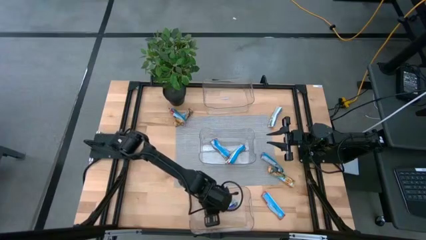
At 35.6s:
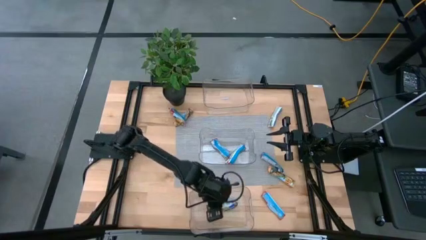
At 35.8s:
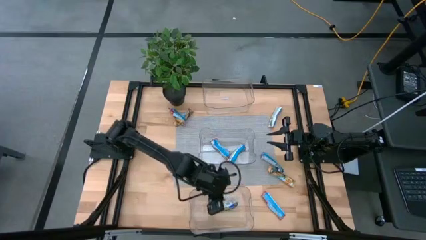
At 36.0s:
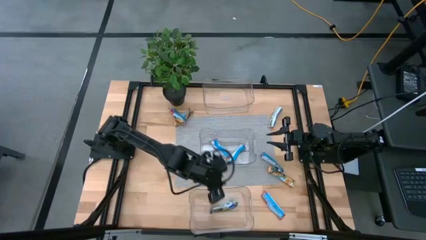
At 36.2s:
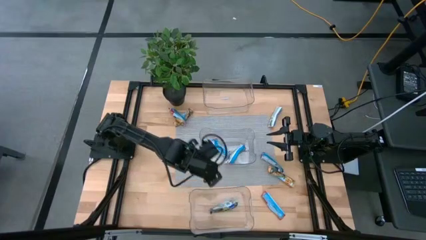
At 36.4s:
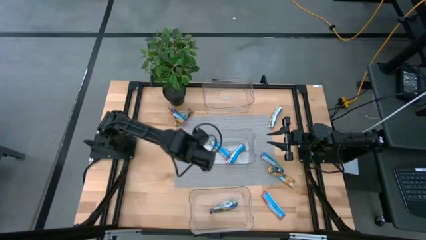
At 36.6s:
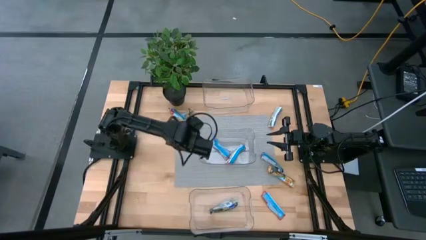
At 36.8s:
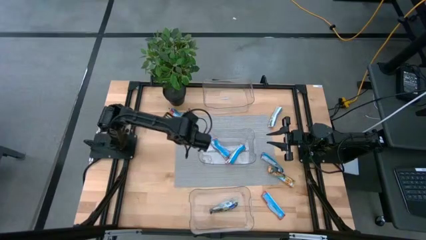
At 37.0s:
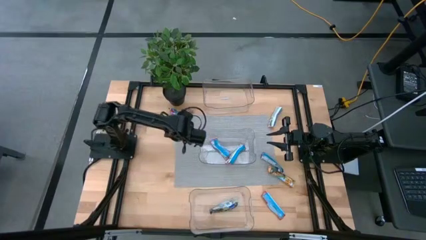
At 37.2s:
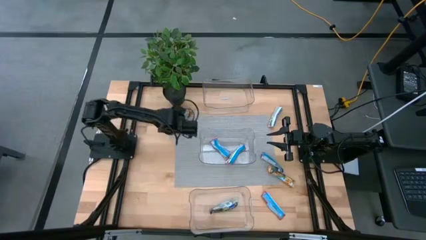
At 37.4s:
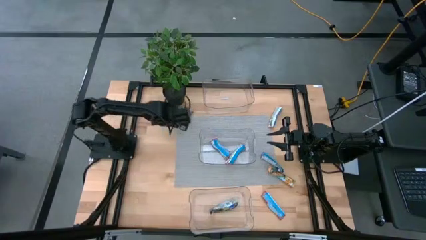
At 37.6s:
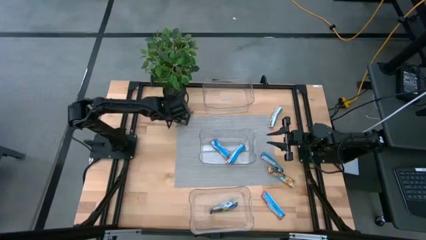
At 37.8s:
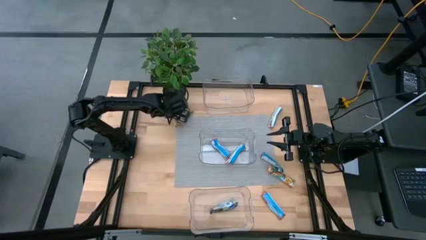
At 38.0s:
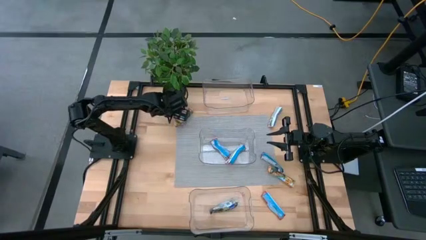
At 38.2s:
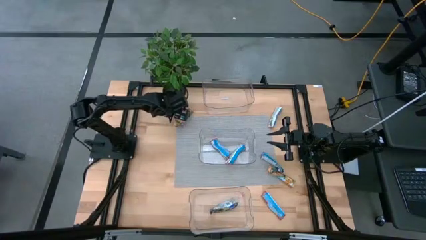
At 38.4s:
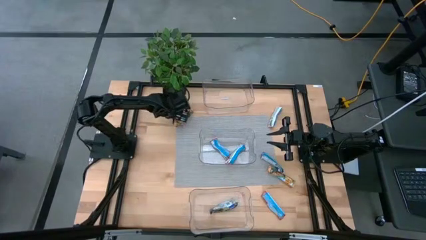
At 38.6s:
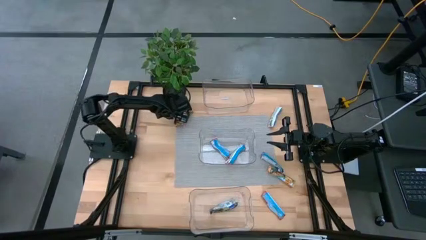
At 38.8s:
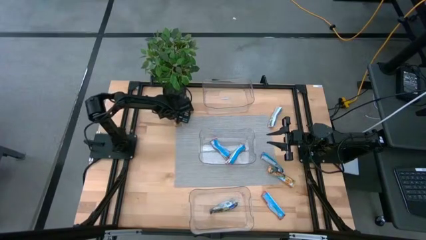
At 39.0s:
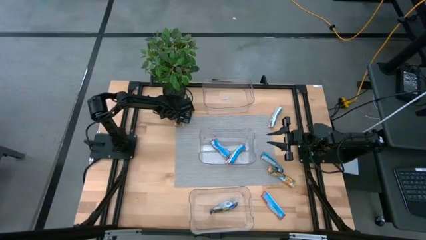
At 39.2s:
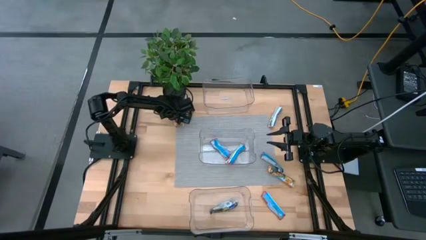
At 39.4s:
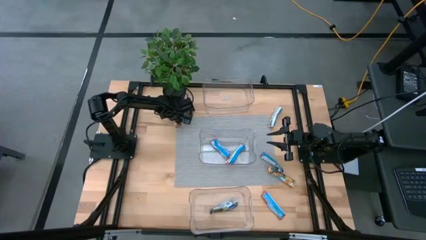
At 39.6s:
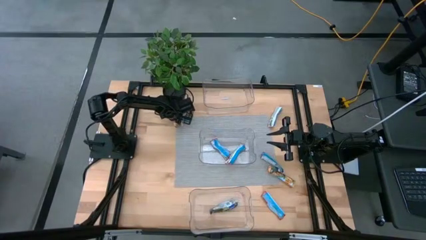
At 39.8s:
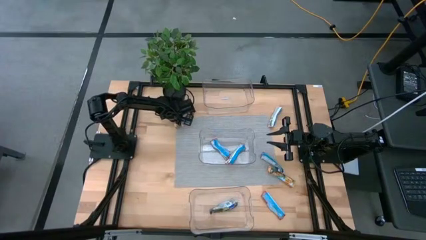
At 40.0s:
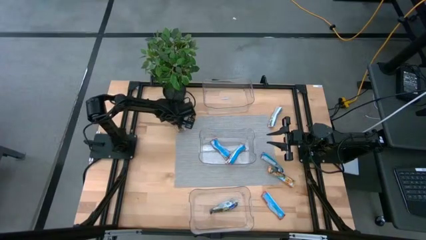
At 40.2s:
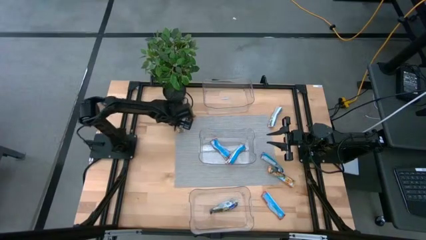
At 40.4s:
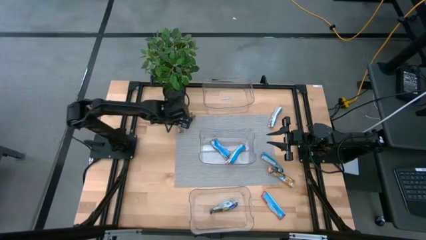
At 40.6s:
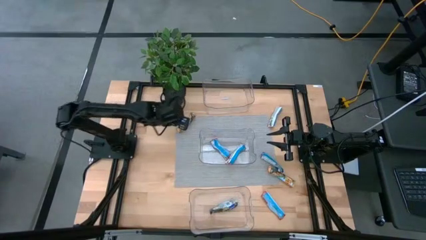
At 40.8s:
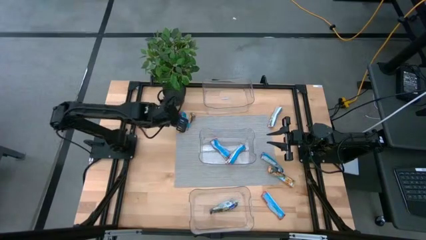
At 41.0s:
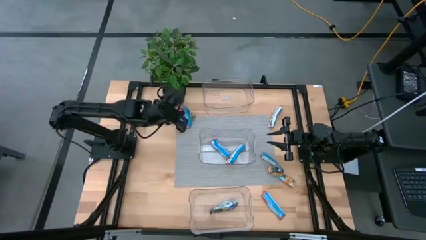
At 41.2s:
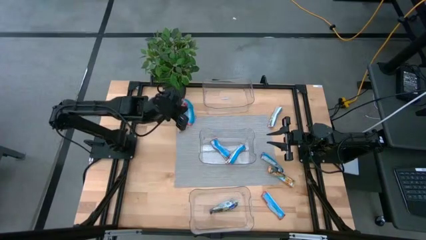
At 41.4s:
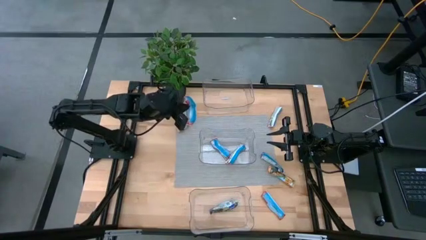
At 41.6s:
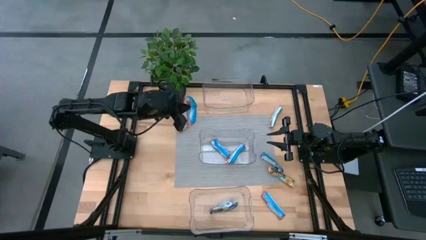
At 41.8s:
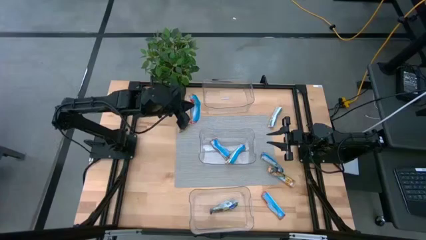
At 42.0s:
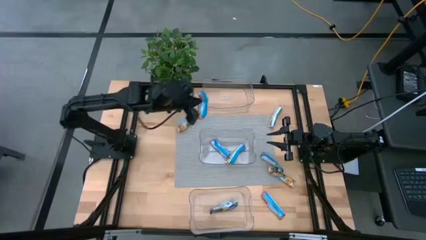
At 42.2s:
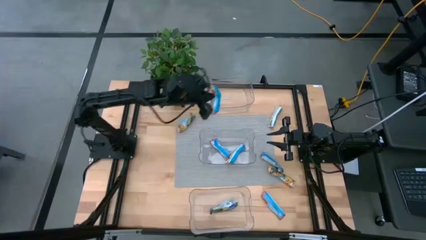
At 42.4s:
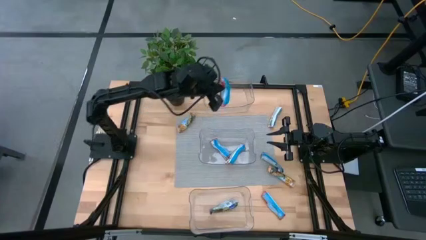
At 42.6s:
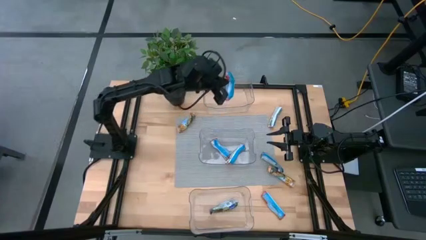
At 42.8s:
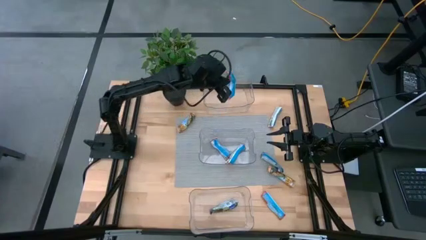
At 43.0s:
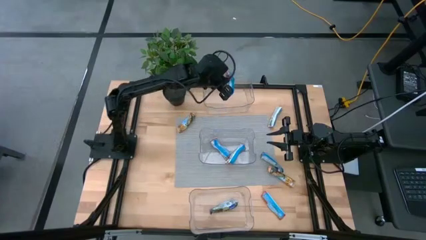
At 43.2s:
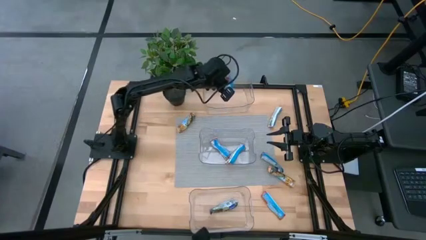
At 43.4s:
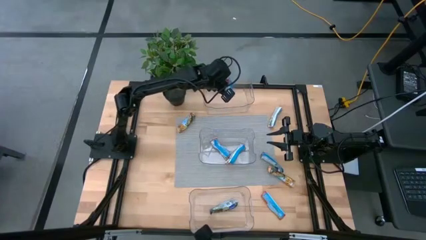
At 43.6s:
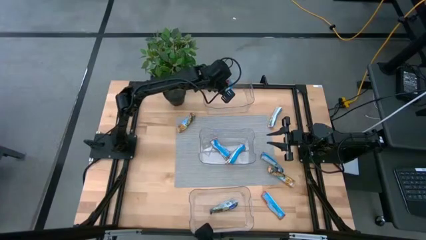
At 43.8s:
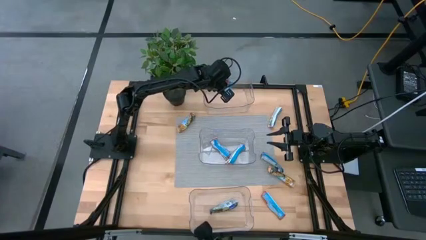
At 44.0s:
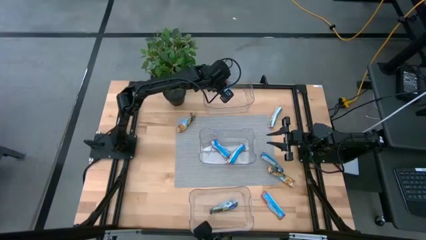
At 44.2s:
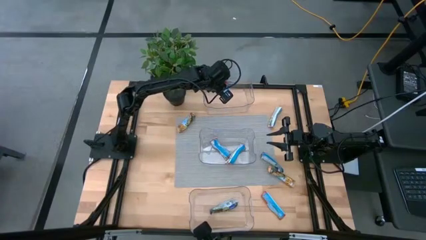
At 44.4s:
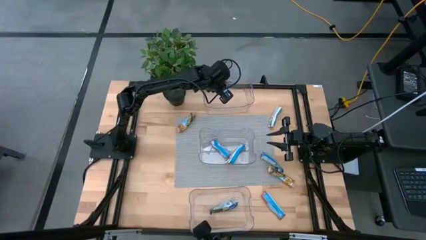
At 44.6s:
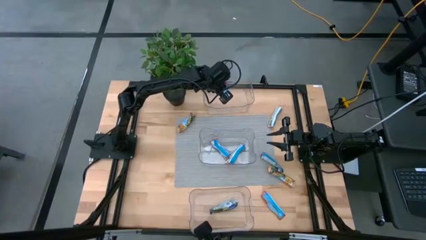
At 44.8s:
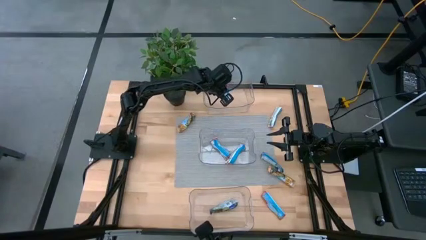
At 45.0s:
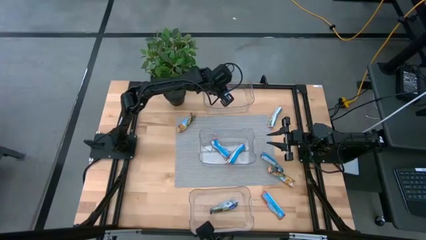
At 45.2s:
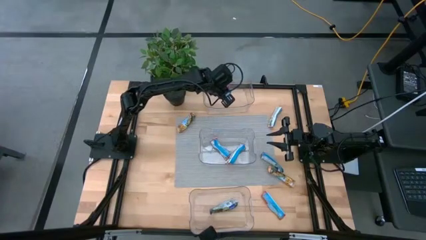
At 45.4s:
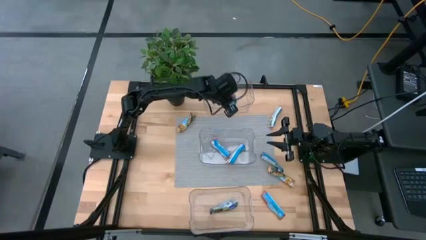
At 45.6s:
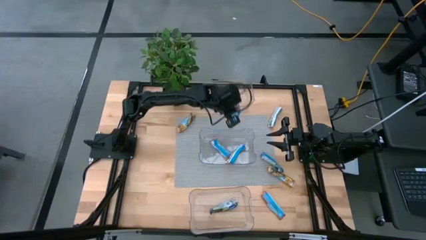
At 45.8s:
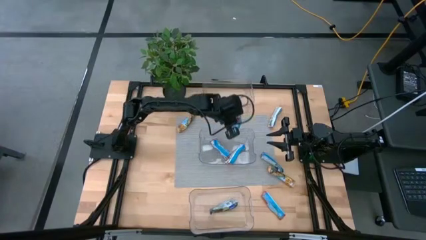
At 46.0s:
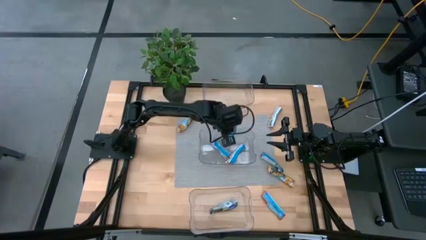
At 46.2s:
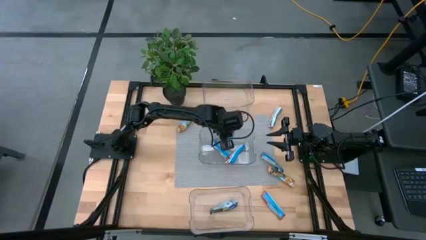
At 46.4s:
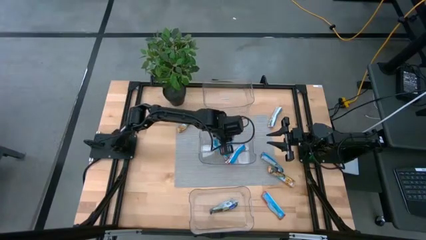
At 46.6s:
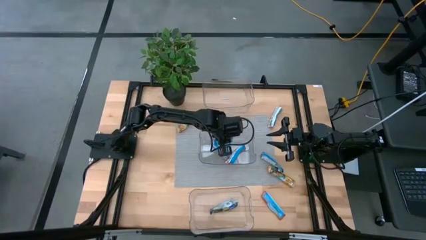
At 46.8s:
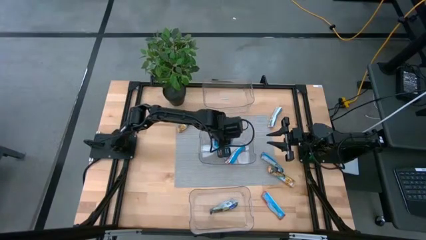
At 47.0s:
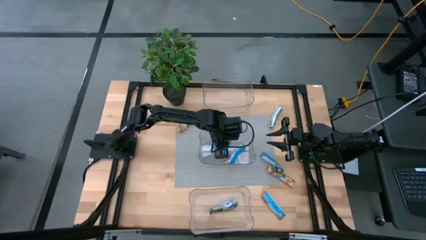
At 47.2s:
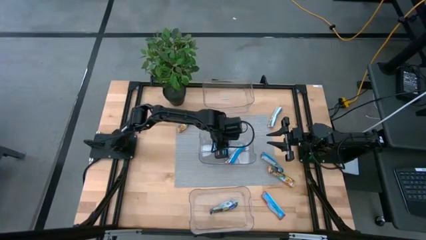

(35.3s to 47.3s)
Task: Pick and place Granola Bars by type
Put the red granola bar into the middle transparent bin

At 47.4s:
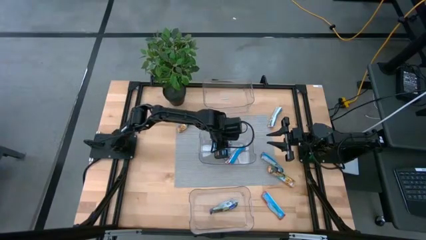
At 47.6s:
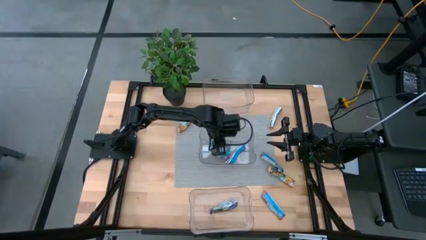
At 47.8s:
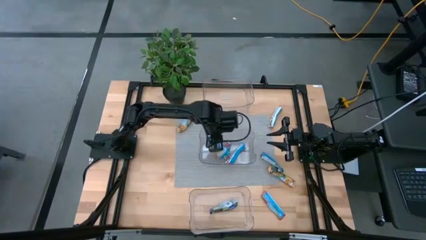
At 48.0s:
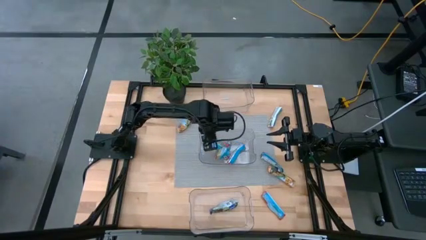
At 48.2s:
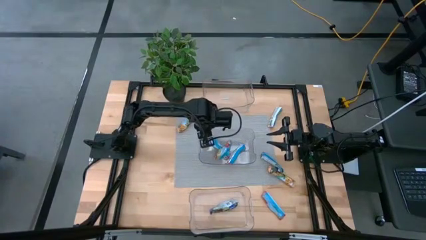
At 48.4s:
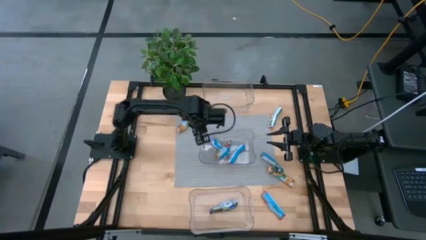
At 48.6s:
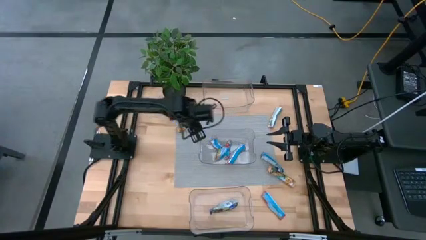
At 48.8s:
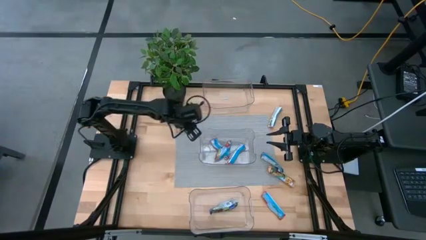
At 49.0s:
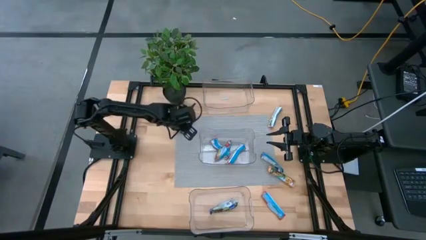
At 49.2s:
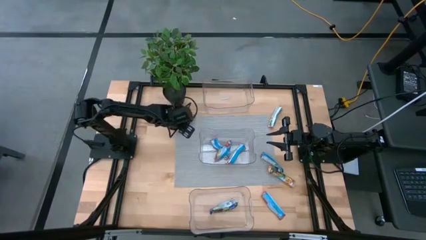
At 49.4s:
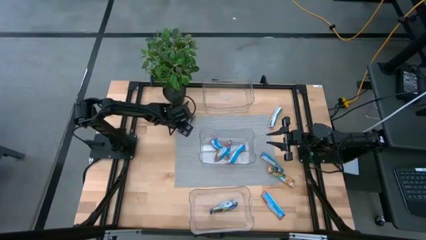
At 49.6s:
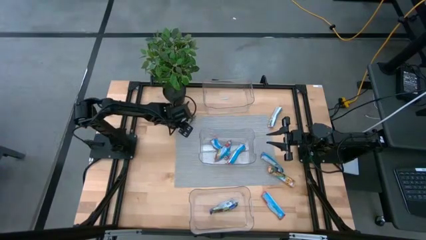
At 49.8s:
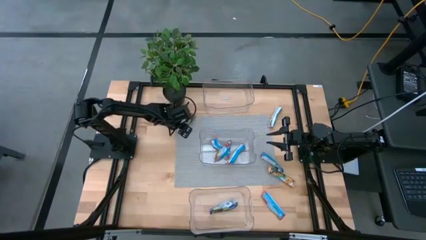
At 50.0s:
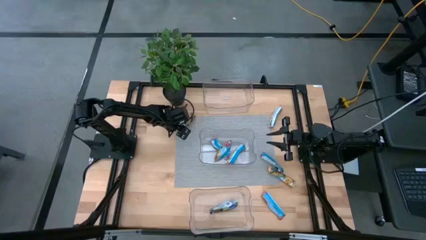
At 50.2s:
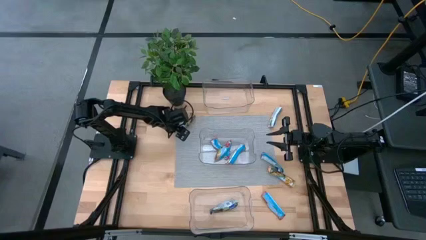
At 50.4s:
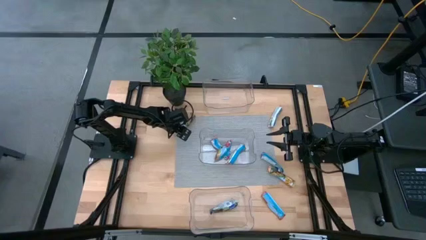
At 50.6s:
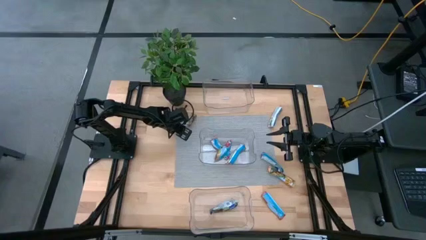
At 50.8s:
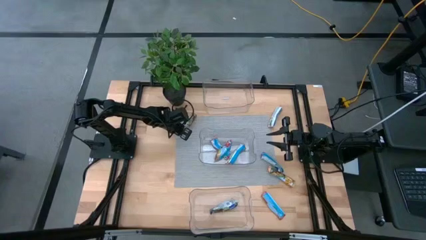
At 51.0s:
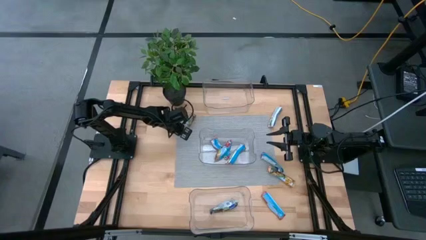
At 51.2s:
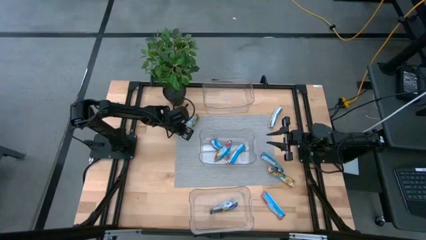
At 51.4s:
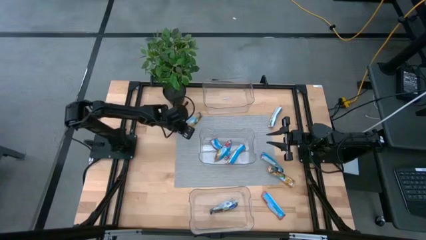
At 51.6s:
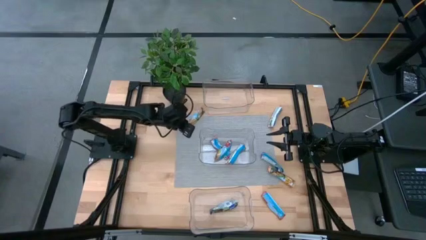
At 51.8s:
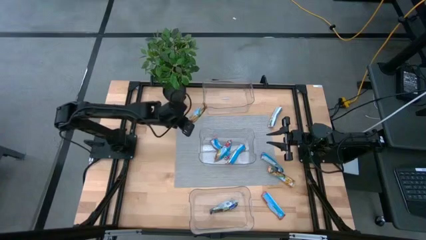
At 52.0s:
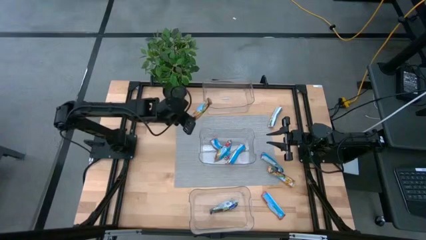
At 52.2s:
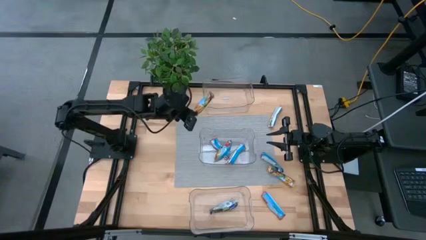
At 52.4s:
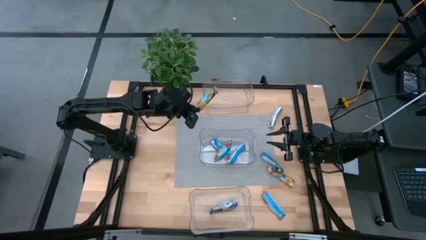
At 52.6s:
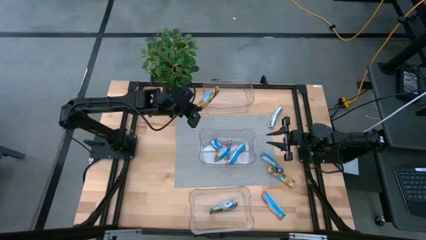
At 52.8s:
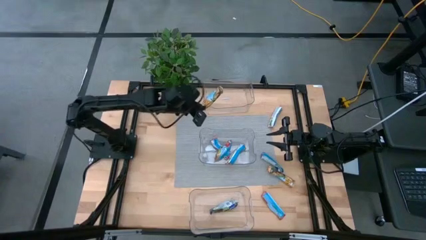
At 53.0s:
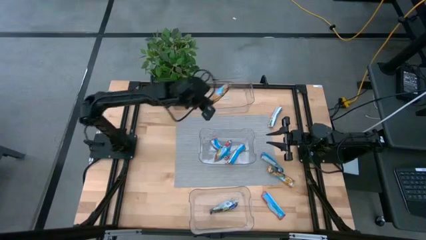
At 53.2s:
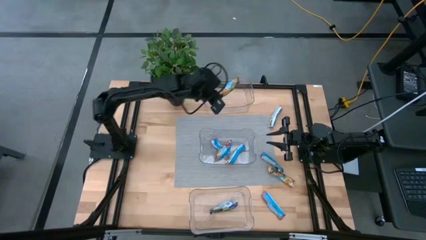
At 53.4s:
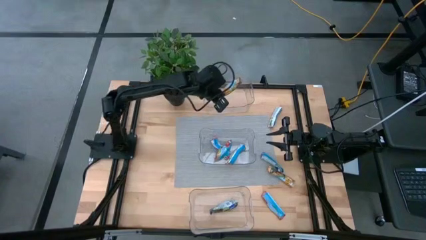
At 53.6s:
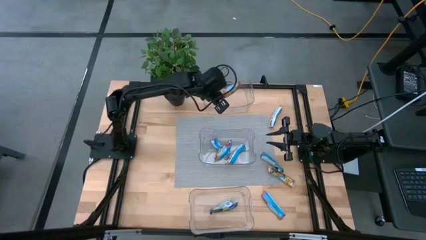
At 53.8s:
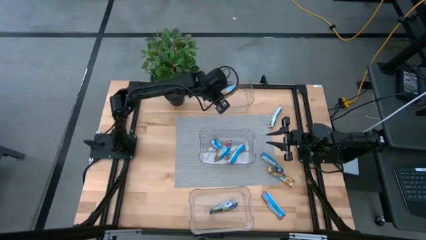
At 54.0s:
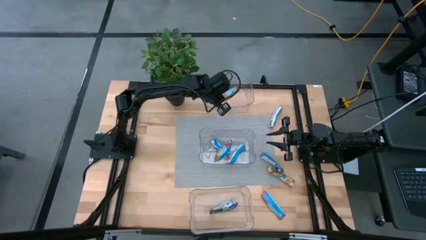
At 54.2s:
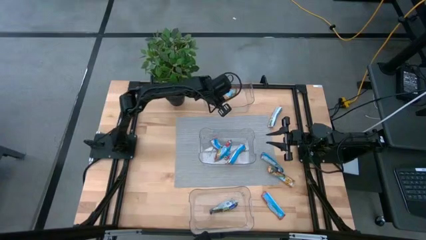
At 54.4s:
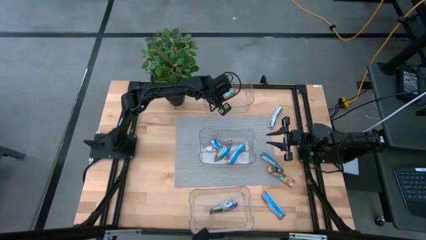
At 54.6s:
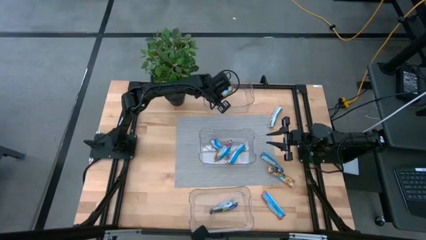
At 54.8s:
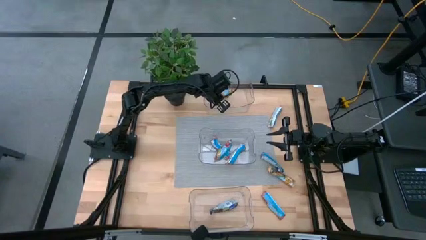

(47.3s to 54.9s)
Put the orange granola bar into the top transparent bin
